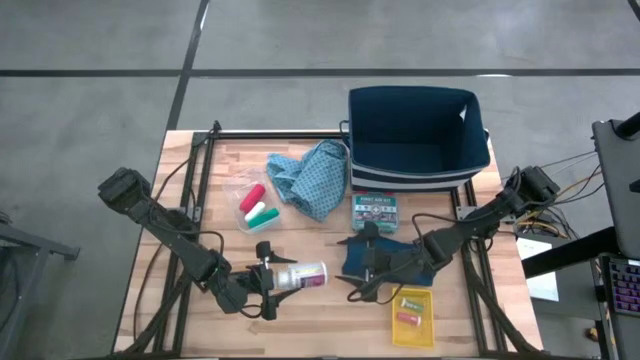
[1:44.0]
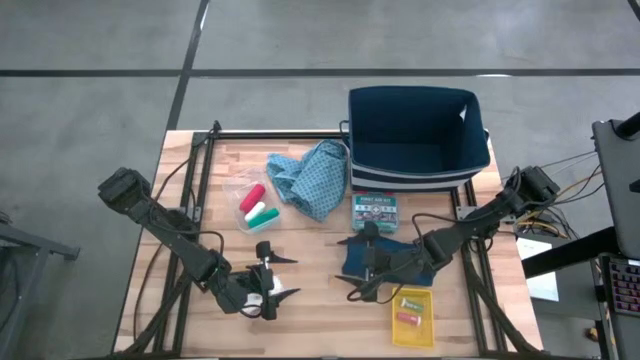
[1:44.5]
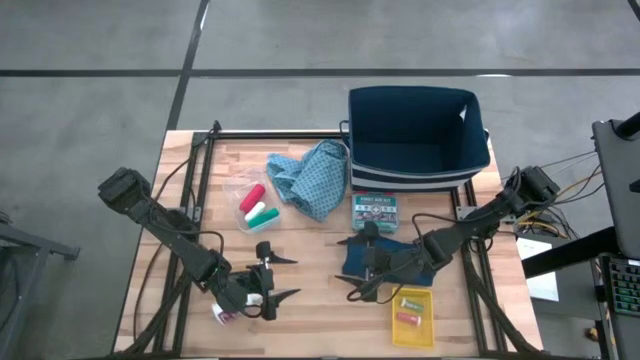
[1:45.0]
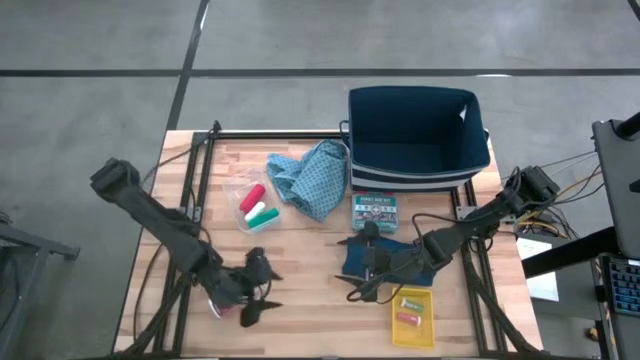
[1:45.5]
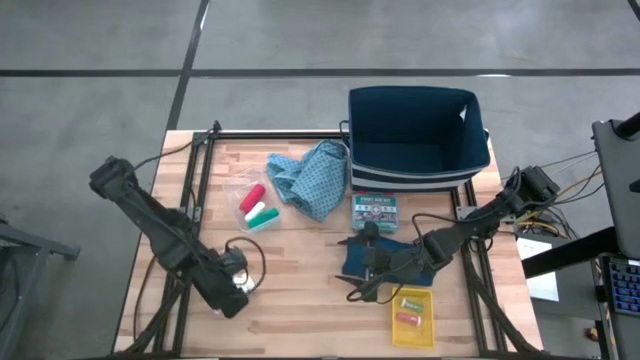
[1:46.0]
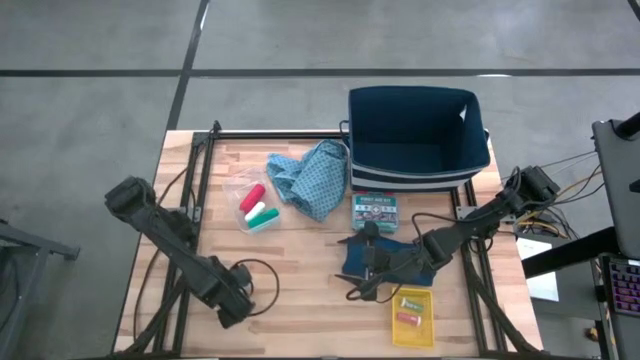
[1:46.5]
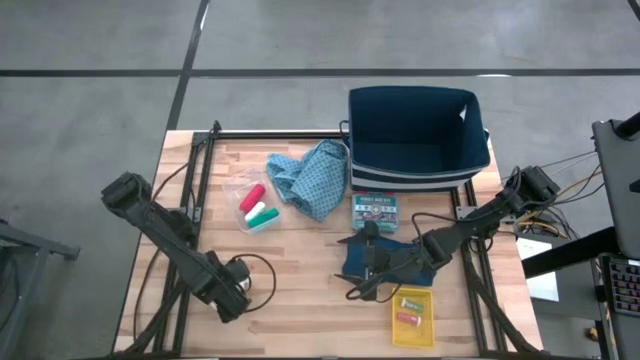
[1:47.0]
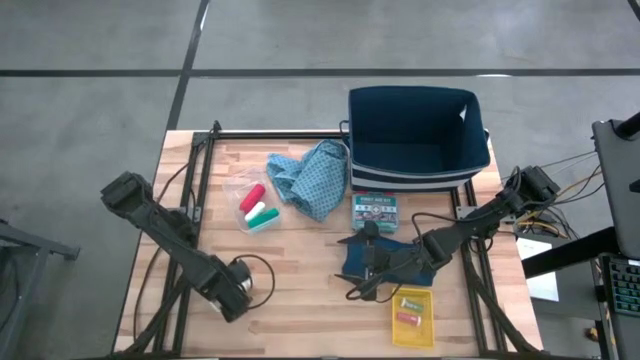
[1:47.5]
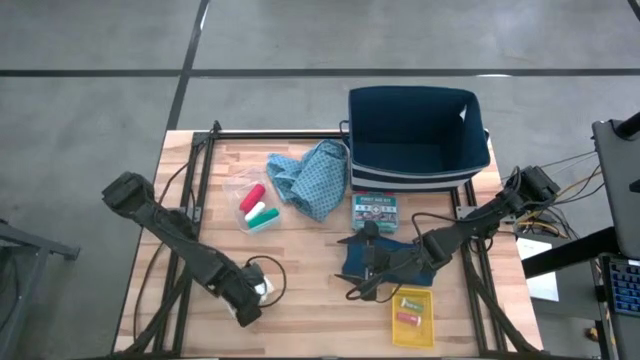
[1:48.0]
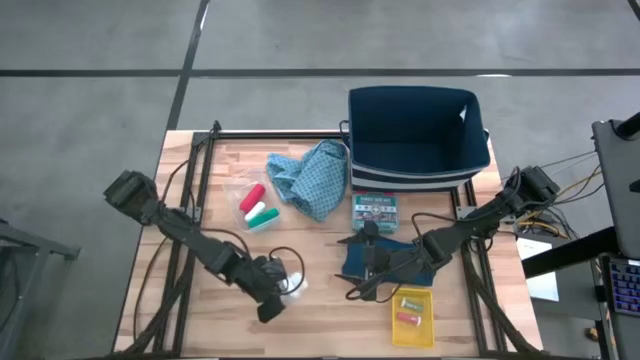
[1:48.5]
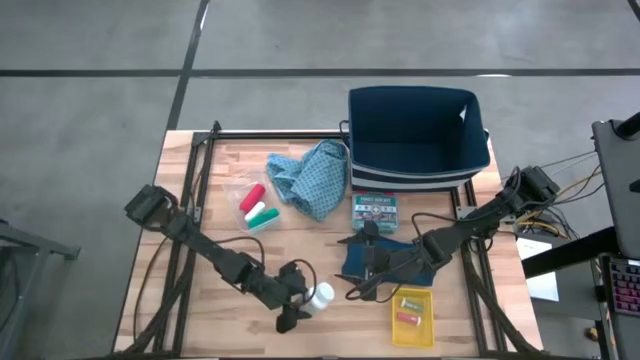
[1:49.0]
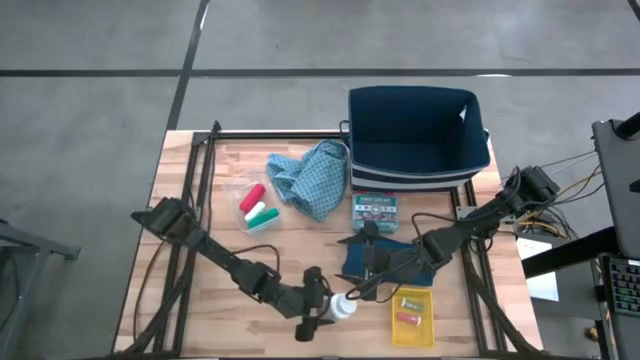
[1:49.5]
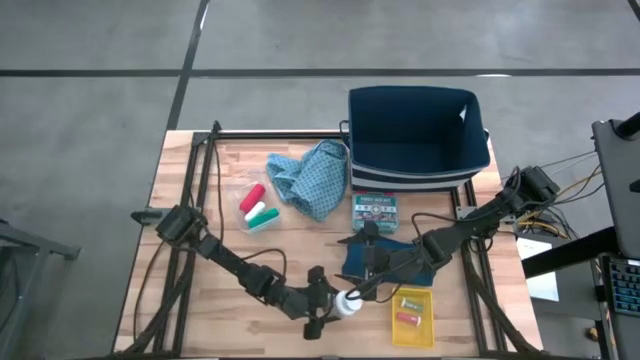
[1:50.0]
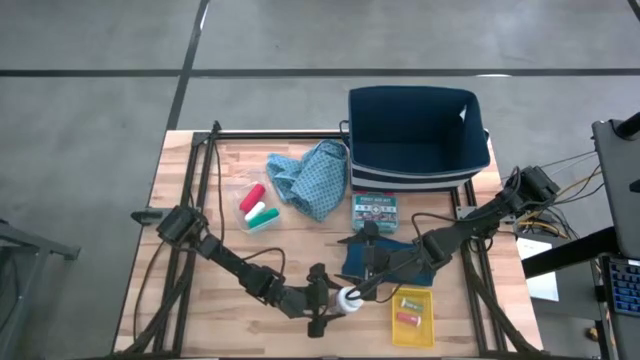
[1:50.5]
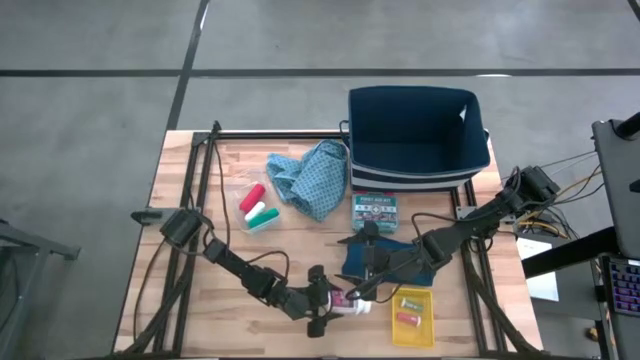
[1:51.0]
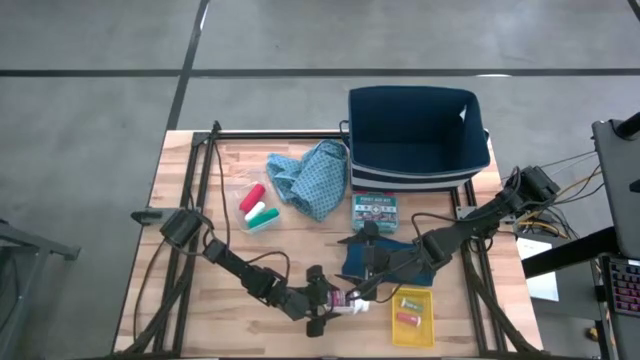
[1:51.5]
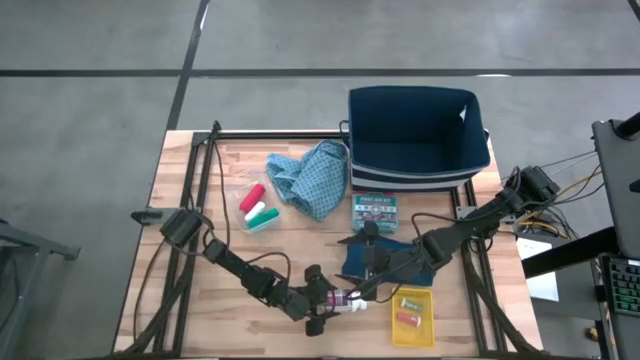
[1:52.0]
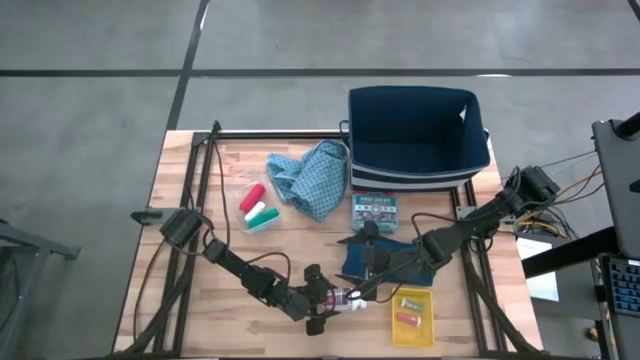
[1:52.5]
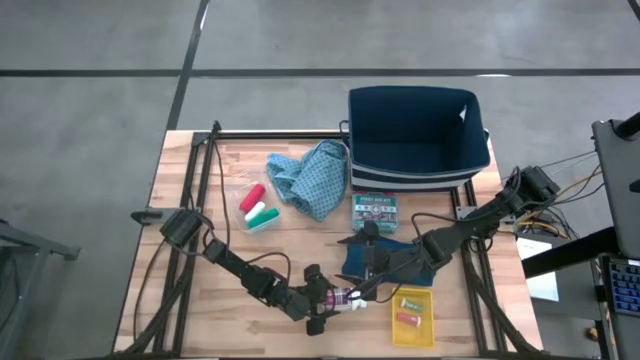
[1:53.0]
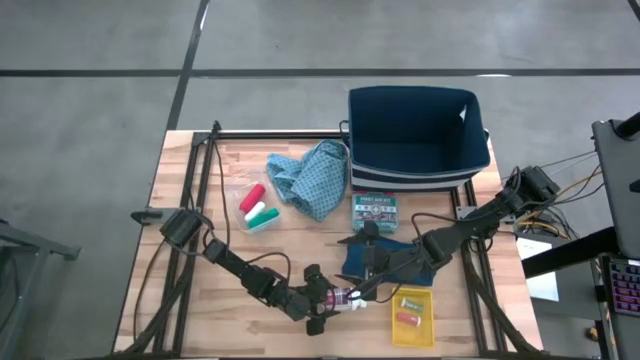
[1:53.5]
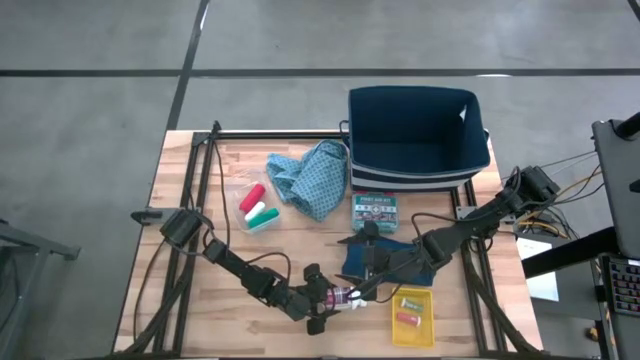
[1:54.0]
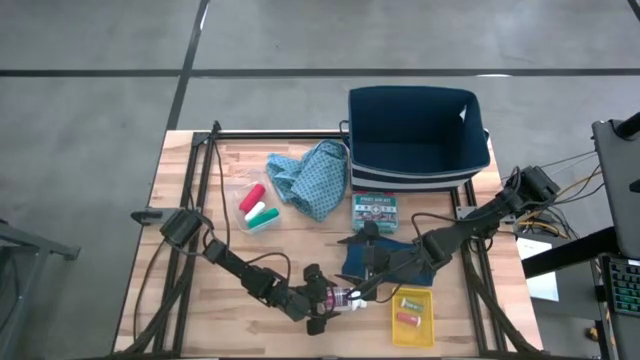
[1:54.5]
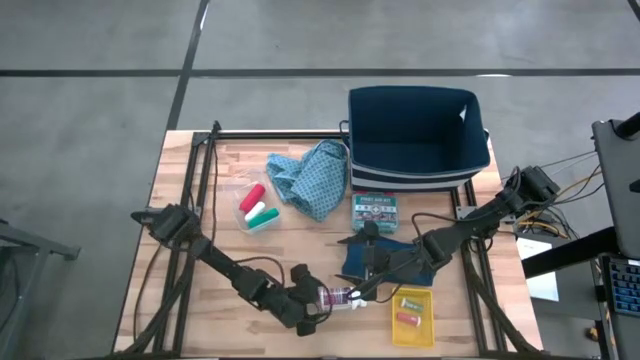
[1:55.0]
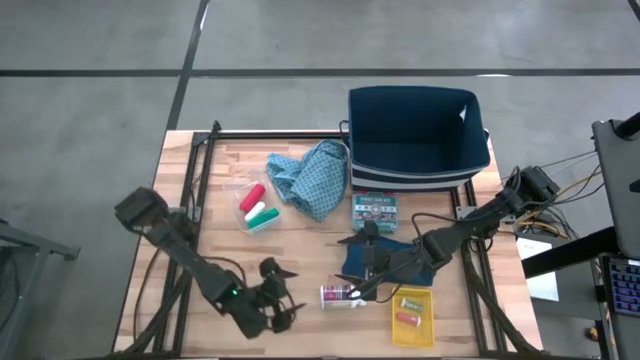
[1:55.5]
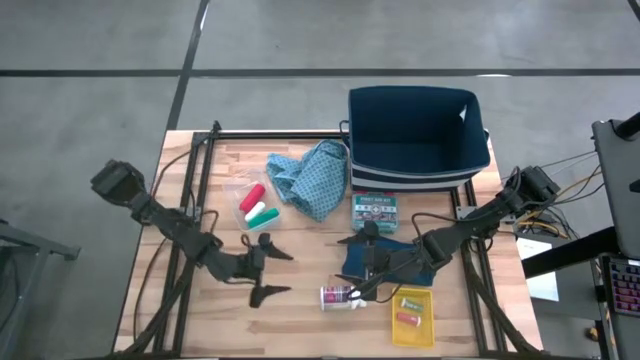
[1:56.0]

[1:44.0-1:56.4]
Task: Pick & place medical supplies in basket/bin
Put the white pill bottle into the yellow bin

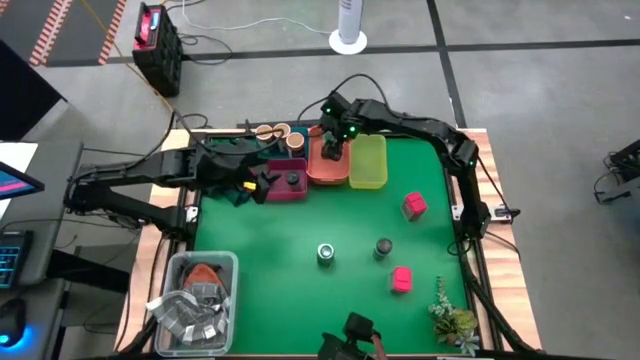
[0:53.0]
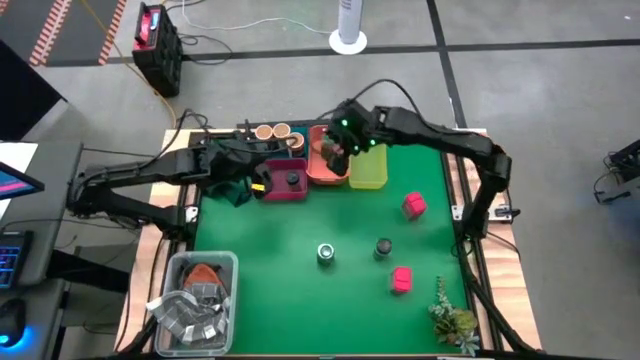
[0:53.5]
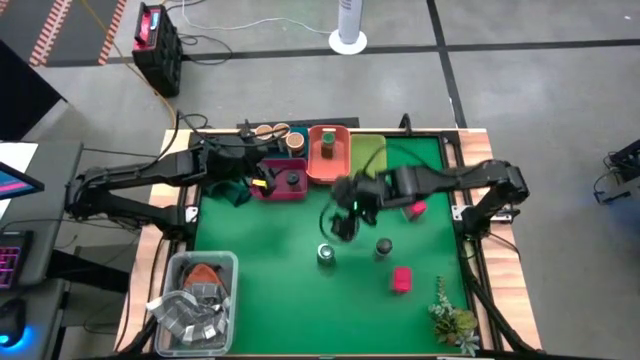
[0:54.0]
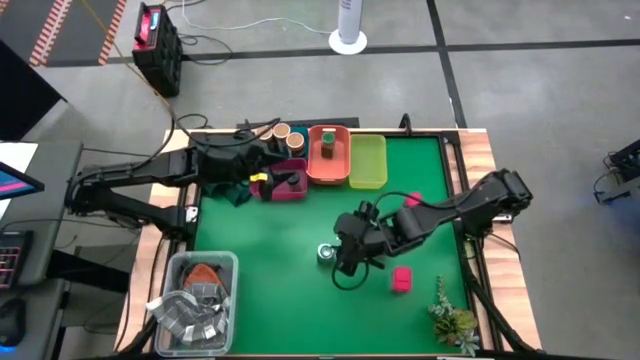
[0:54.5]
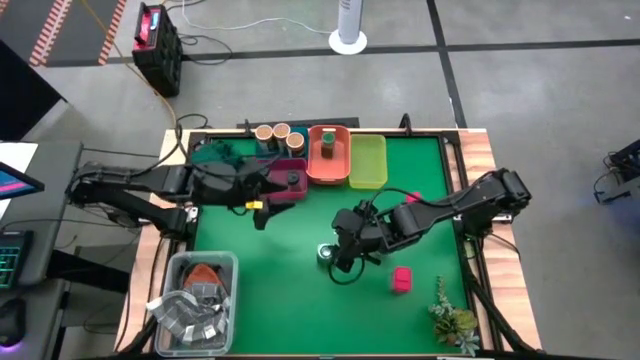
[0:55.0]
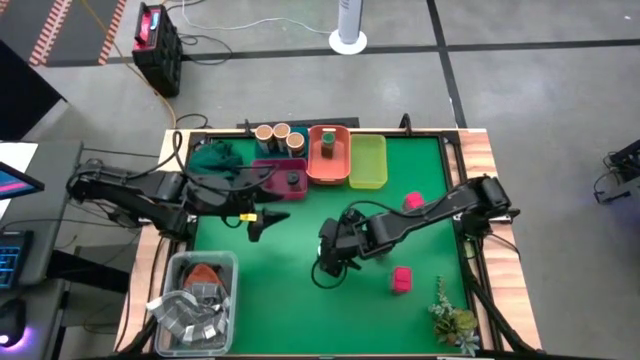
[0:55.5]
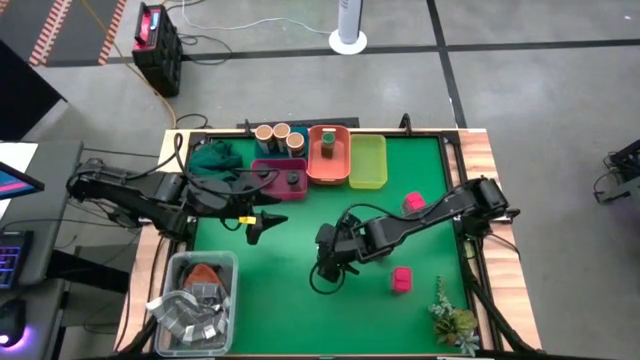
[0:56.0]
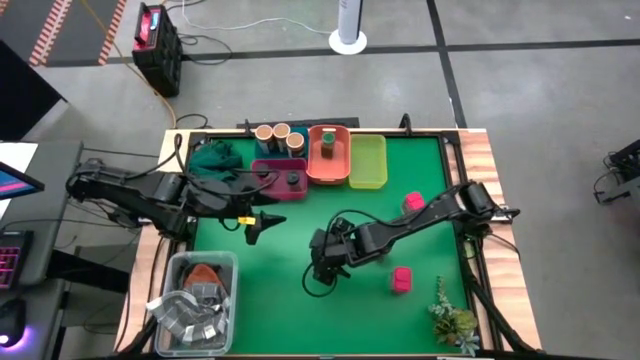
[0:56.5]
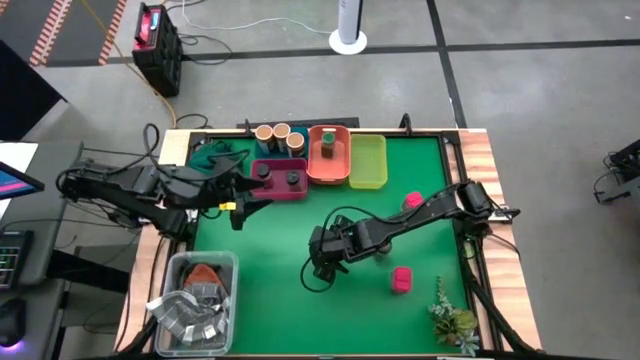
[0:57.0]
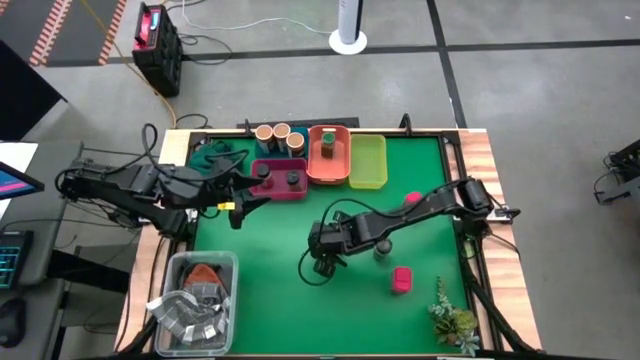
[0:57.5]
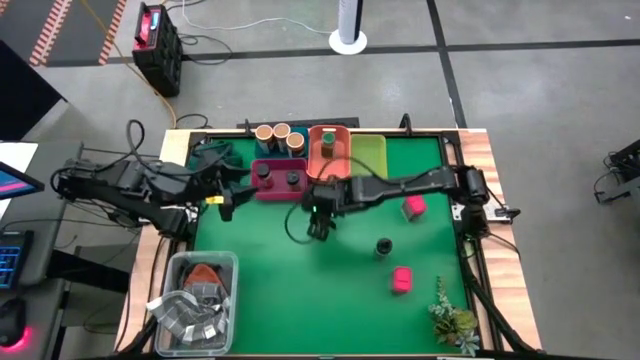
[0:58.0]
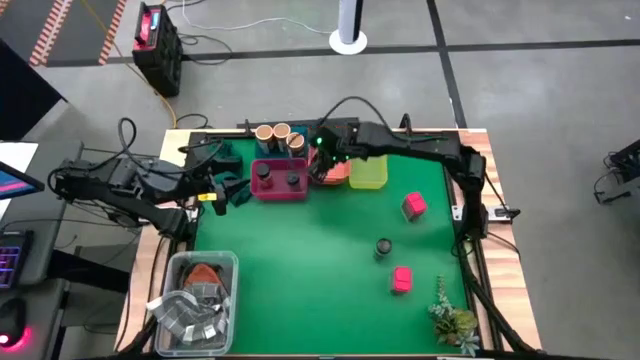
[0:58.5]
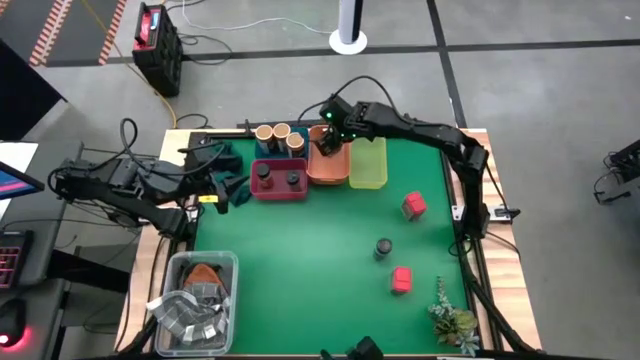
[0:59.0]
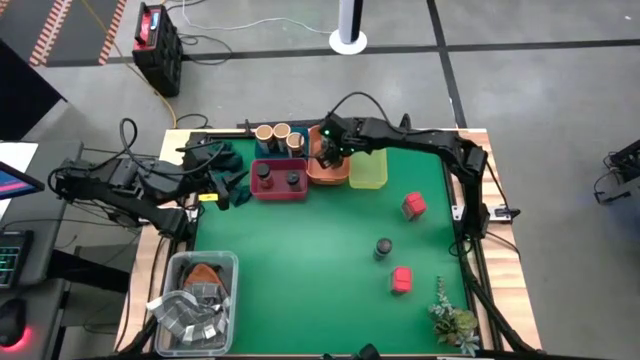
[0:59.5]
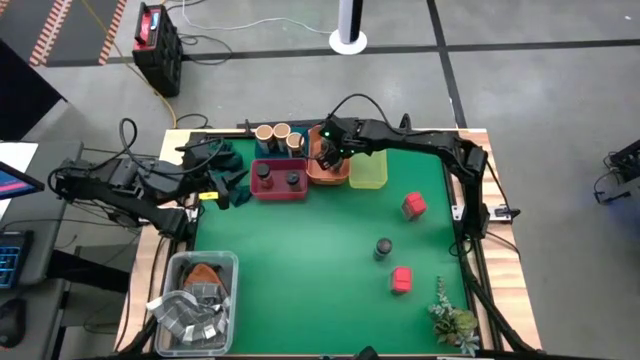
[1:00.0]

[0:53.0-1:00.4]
Task: Sort spices by type
Put the green seasoning bottle into the orange bin
